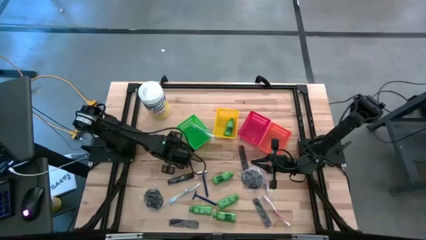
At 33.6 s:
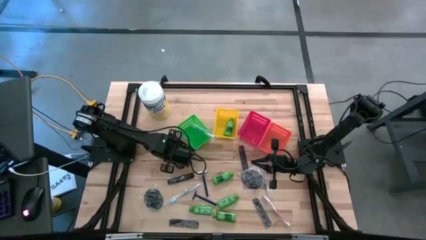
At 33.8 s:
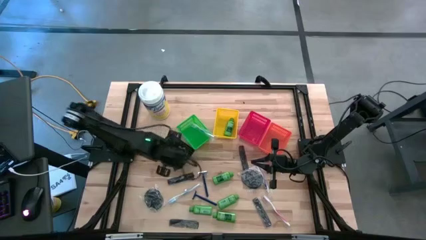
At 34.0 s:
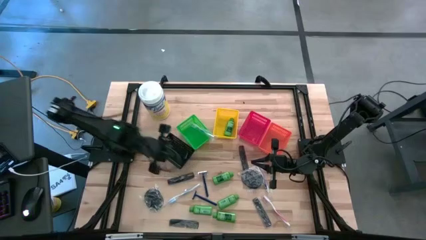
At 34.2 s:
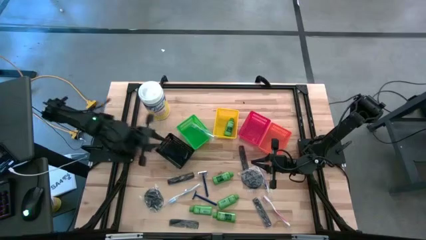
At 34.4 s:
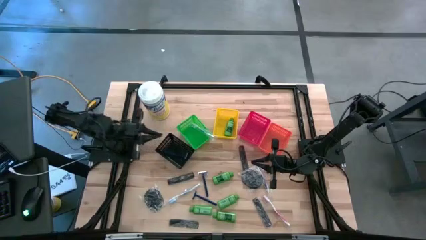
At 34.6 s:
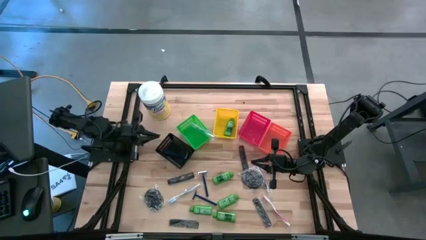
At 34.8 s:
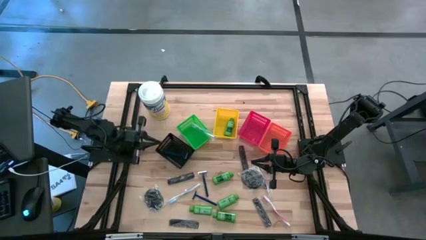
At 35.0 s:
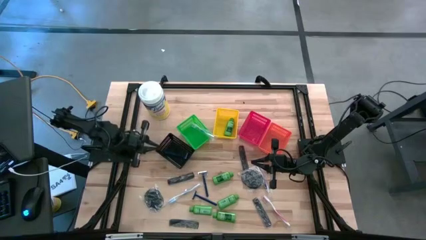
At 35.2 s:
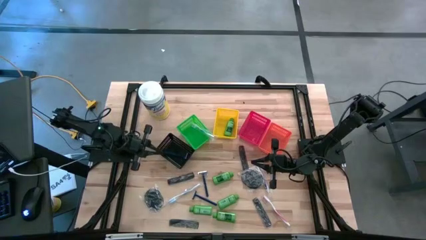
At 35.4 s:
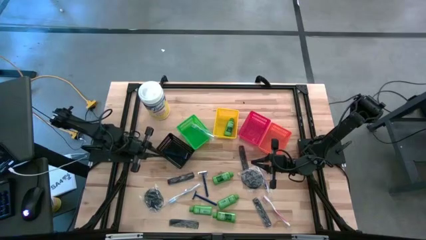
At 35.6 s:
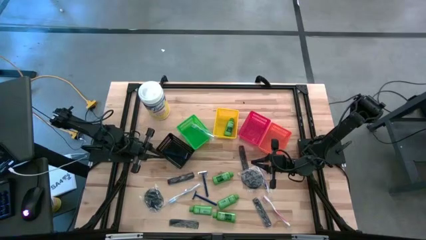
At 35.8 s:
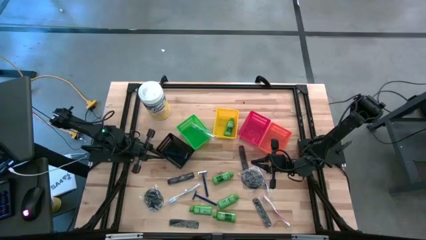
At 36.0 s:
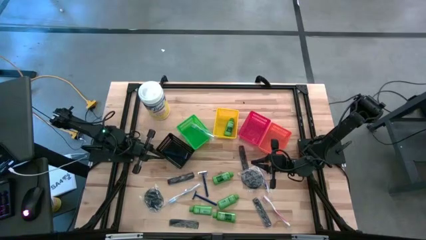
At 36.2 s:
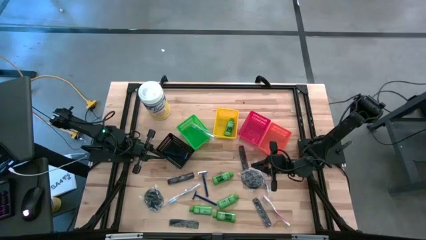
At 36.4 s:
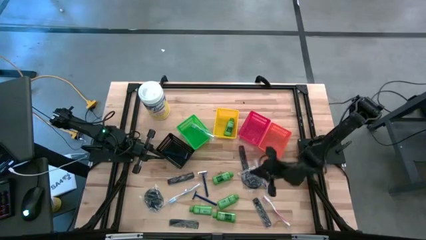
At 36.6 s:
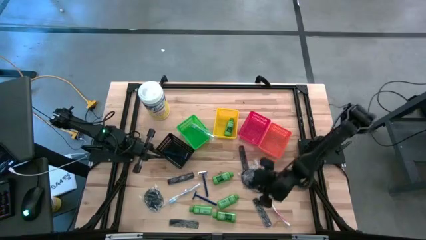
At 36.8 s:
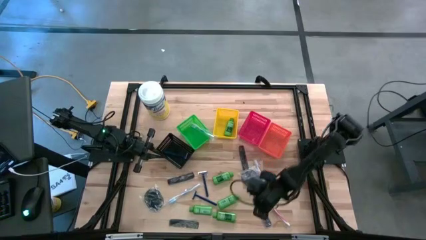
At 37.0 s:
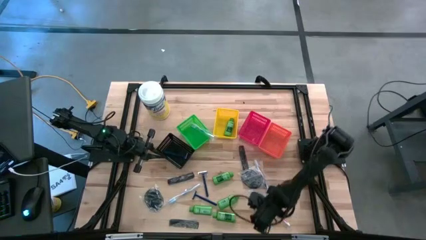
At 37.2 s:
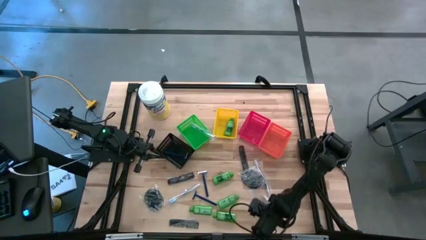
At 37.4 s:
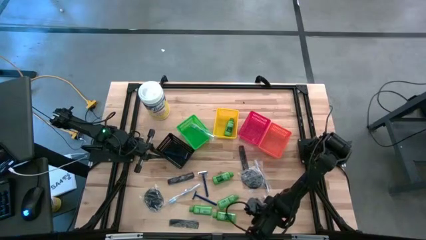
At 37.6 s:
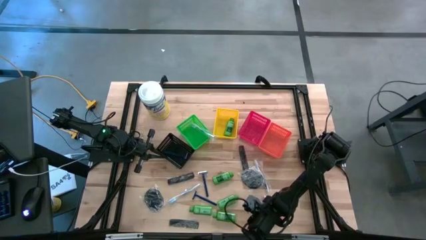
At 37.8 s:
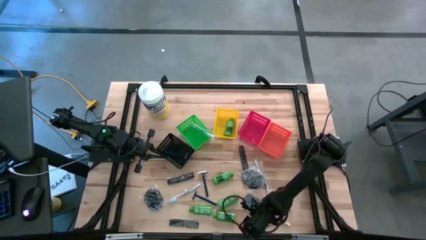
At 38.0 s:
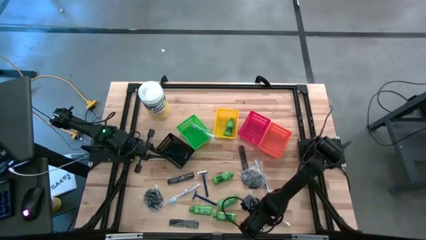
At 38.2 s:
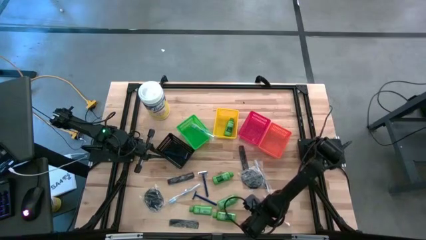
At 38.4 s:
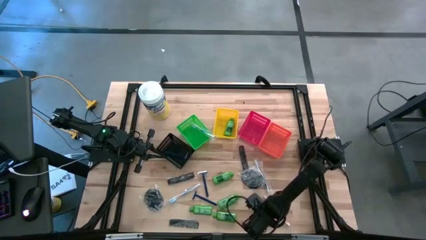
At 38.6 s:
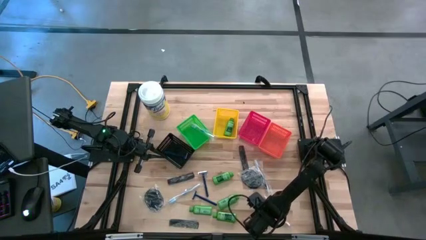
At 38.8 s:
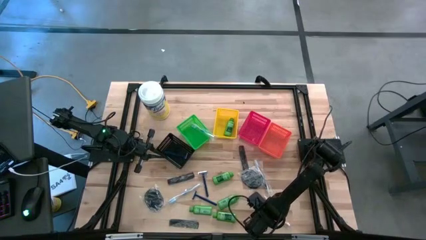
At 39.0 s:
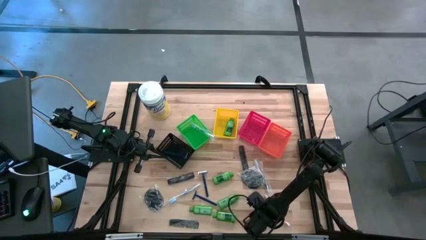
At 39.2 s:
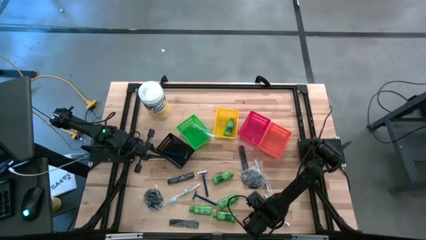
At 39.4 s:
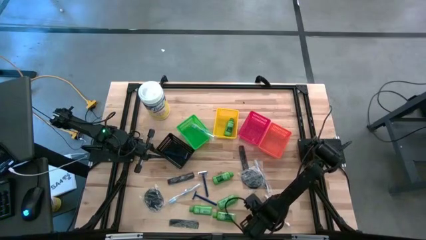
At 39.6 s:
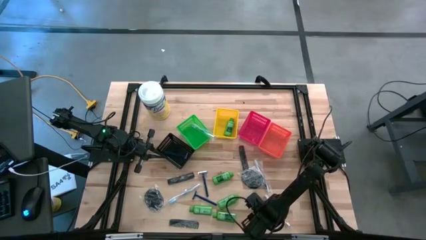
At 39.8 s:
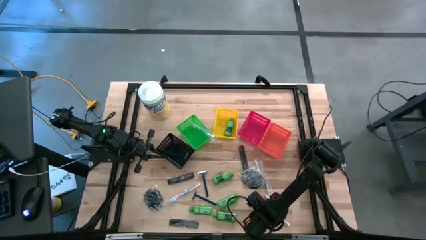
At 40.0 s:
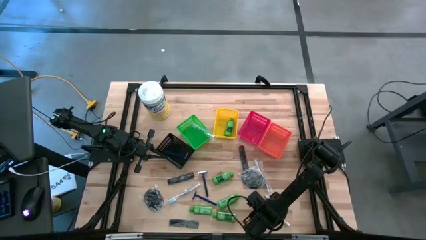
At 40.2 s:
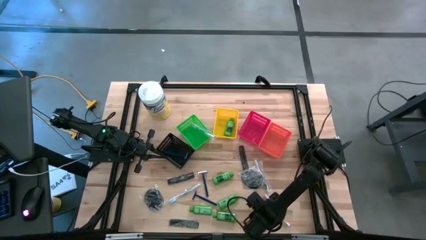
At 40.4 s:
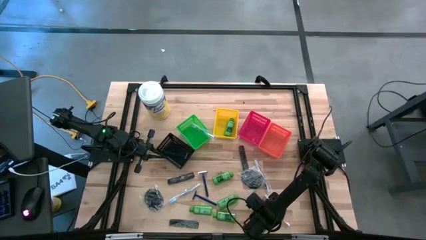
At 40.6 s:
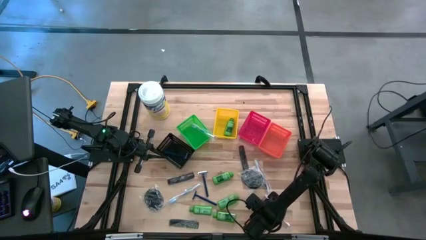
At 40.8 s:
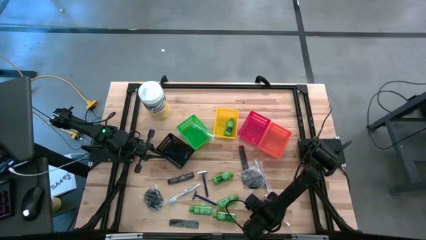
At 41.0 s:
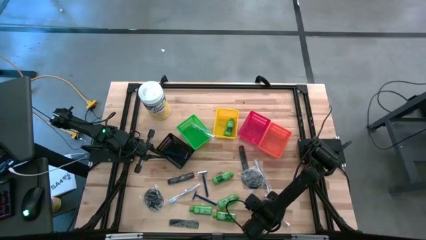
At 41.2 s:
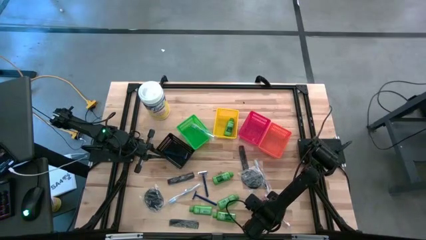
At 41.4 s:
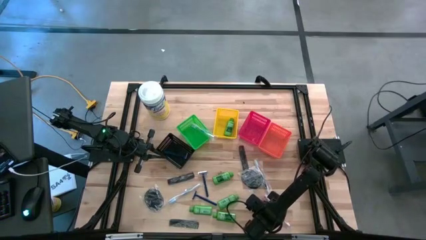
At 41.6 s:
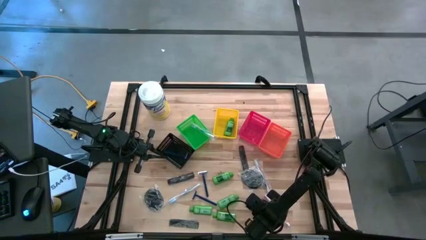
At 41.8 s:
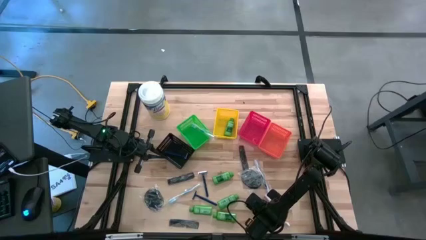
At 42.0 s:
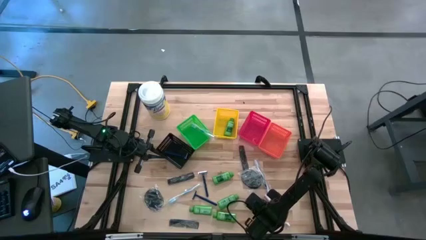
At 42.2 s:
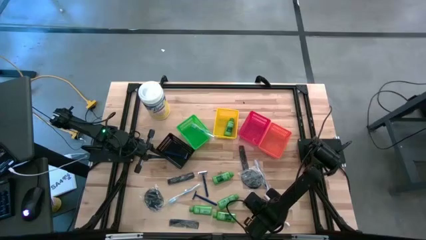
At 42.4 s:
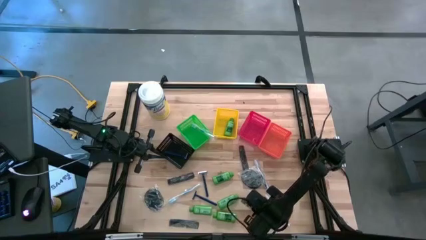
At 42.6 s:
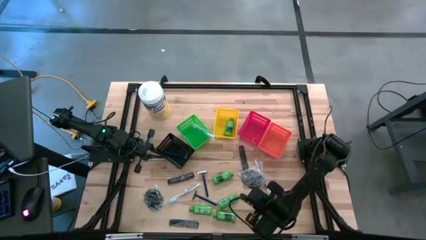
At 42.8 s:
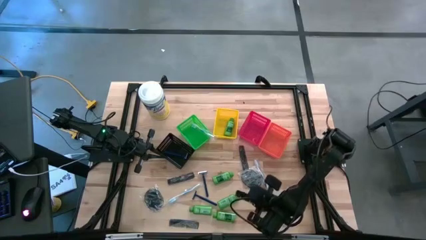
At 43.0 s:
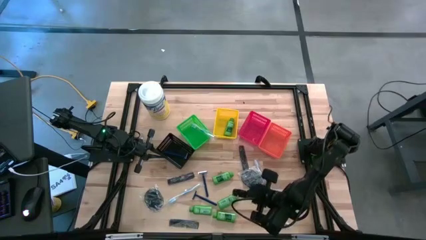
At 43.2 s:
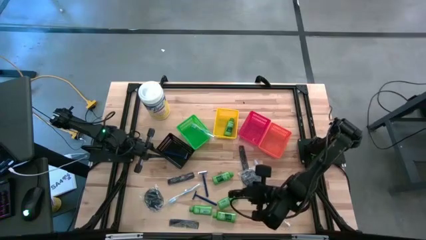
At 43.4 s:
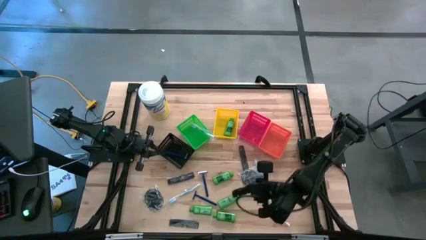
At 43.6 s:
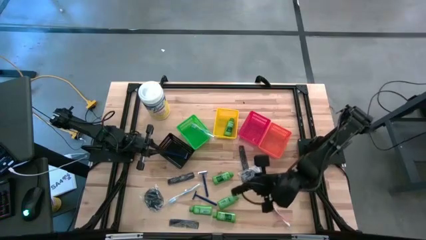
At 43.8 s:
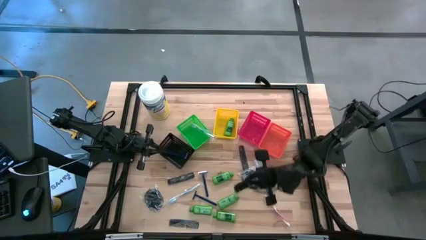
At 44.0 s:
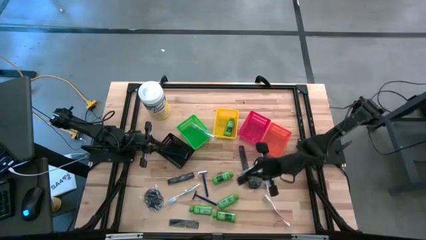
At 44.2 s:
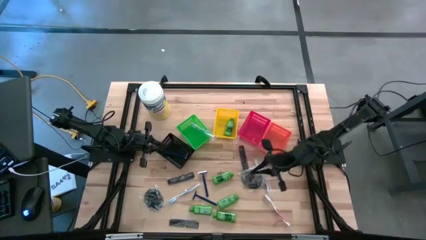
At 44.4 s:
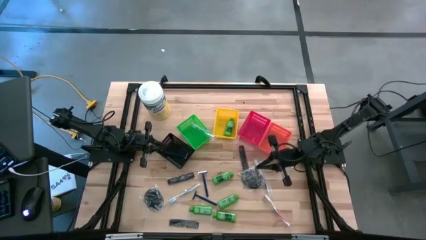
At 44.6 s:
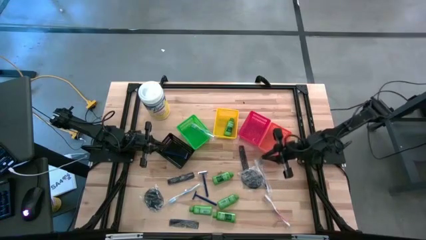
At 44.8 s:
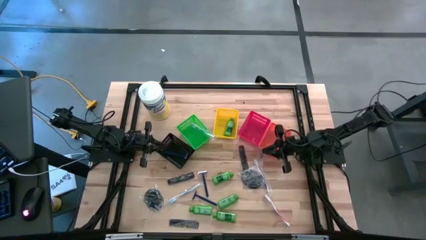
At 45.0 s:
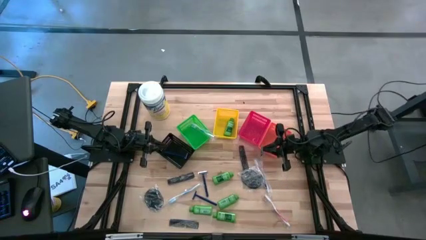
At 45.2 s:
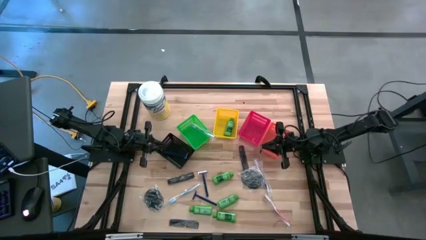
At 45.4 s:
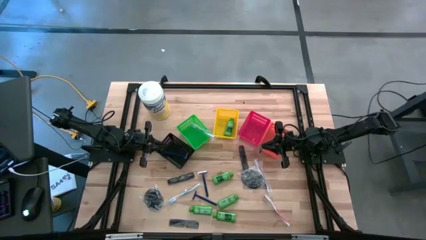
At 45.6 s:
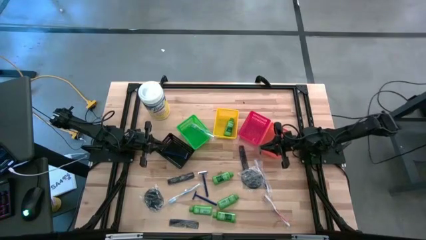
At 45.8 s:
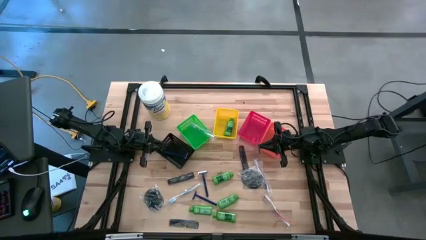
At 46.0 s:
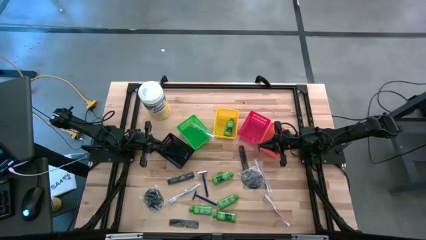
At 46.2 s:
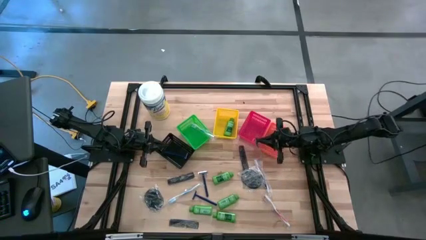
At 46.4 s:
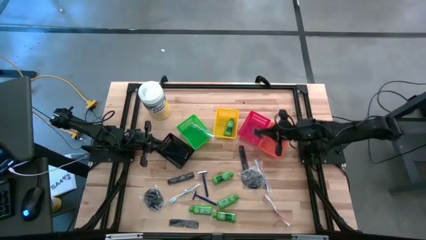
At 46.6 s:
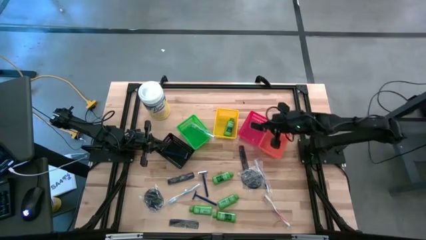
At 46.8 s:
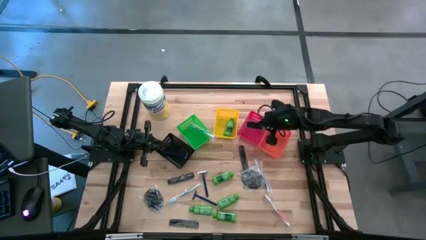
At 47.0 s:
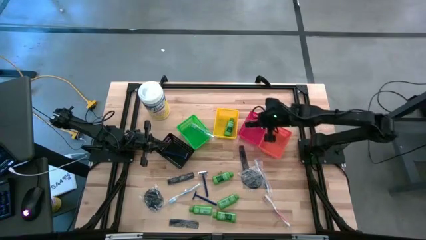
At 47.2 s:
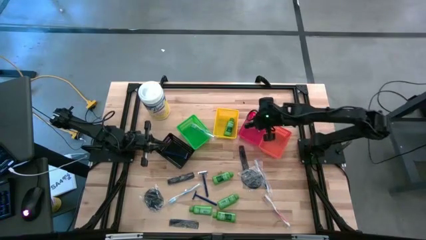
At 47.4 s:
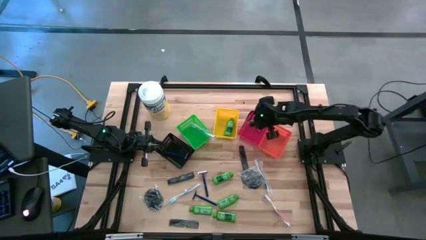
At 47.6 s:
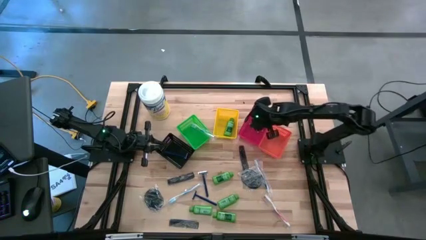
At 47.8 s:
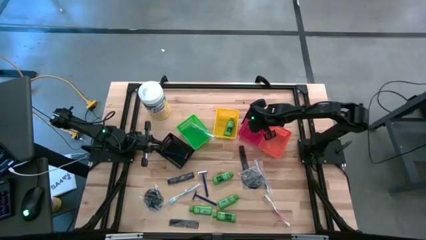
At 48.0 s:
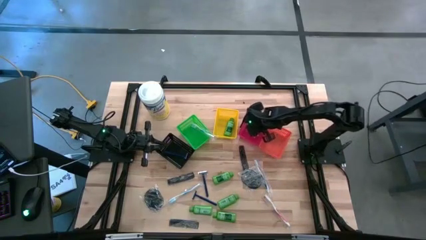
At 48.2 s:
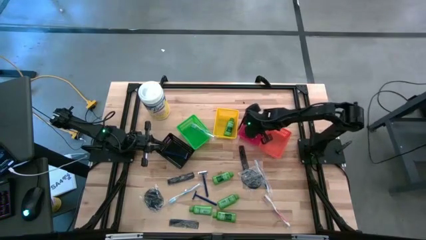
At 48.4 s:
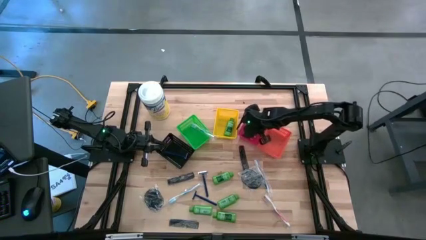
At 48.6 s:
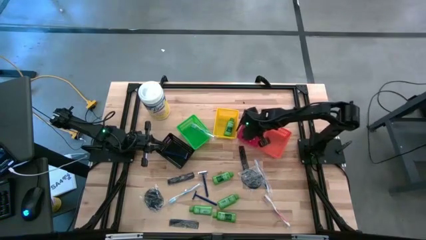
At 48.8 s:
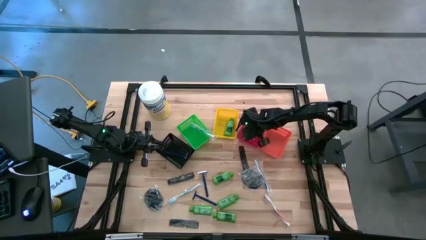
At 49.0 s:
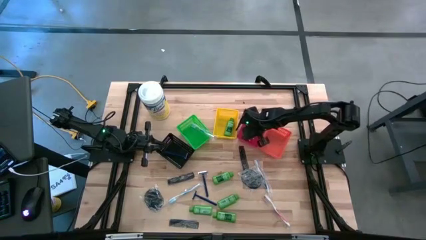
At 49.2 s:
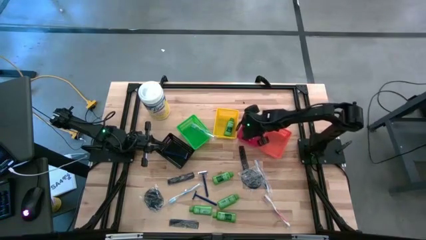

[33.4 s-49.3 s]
Task: Pick & Place Travel size toiletries
Put the black comb into the red bin

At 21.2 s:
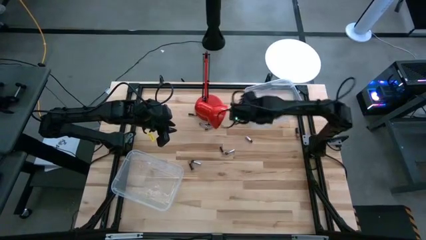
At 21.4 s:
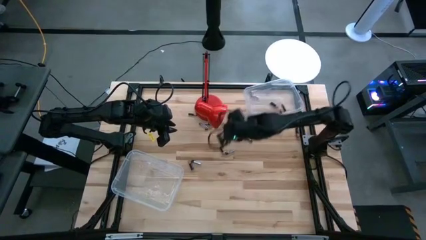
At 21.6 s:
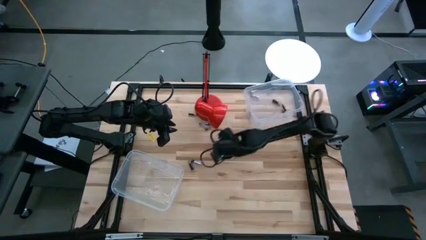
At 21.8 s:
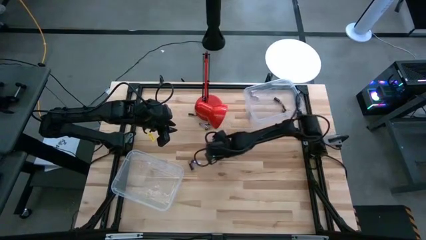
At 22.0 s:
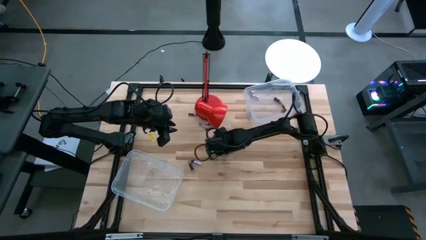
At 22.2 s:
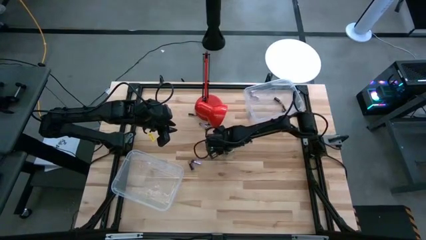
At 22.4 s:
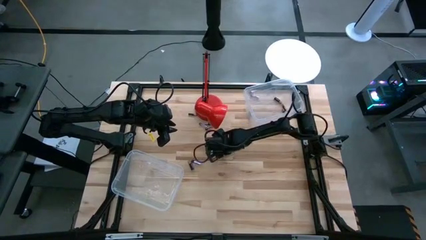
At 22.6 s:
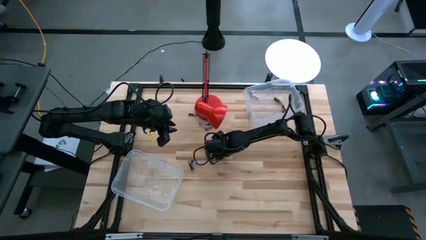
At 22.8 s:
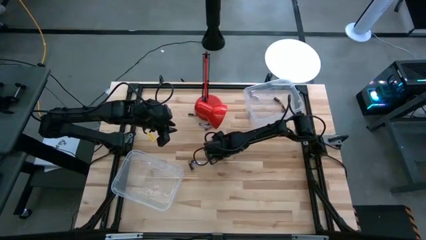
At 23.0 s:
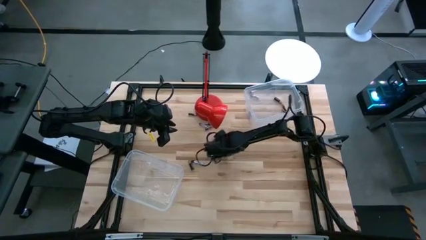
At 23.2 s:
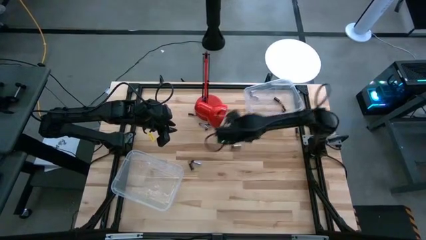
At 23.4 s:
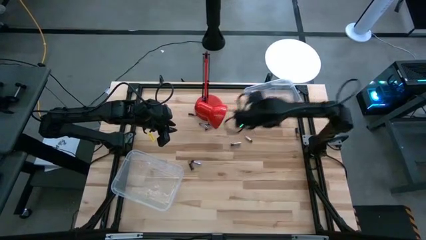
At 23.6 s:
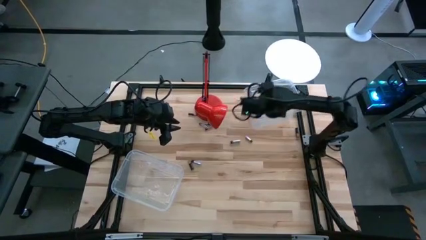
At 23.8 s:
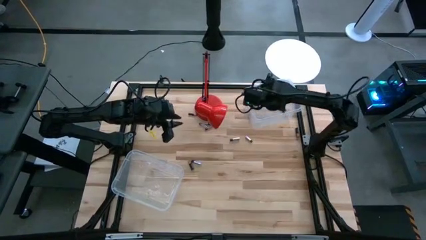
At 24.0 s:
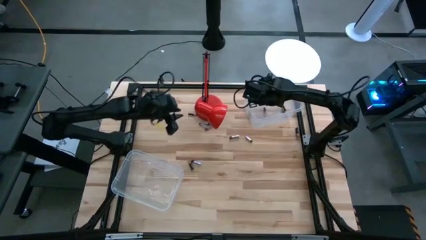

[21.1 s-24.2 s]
Task: Sort batteries
Put the black battery into the top transparent bin
